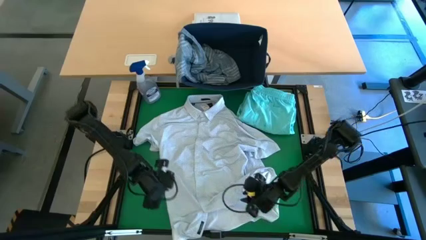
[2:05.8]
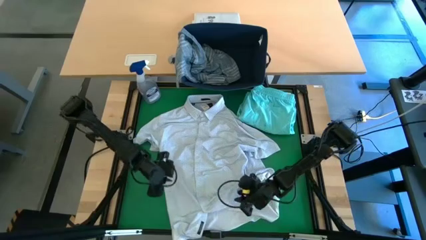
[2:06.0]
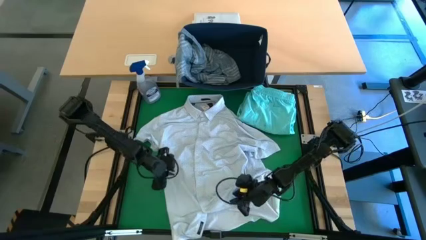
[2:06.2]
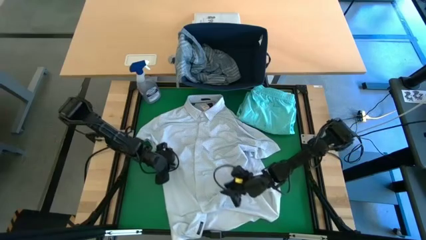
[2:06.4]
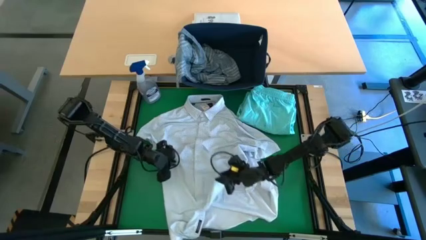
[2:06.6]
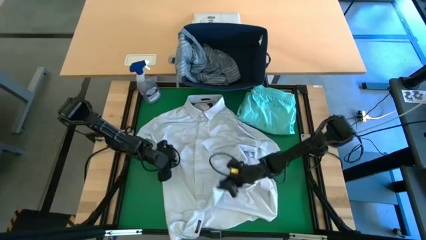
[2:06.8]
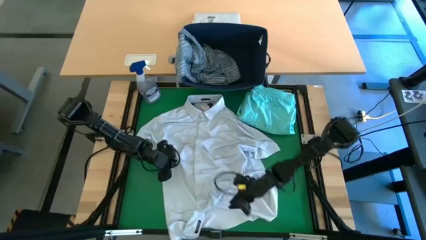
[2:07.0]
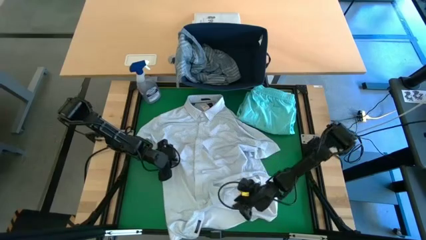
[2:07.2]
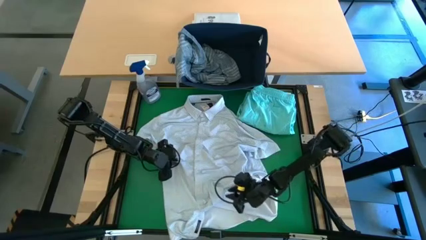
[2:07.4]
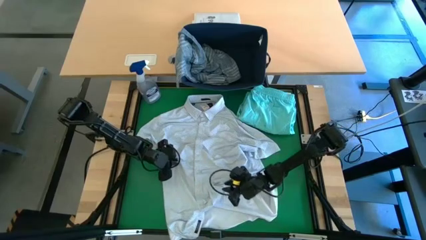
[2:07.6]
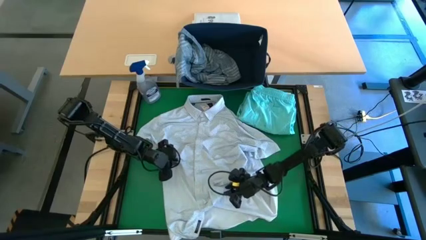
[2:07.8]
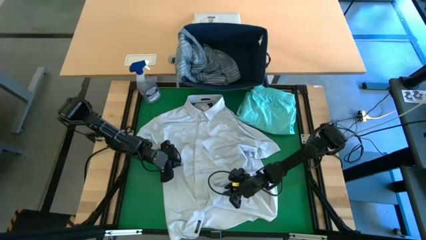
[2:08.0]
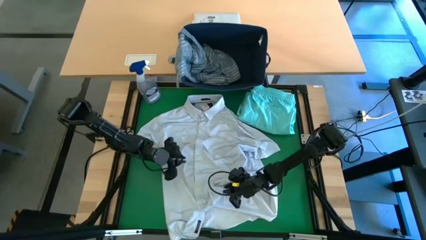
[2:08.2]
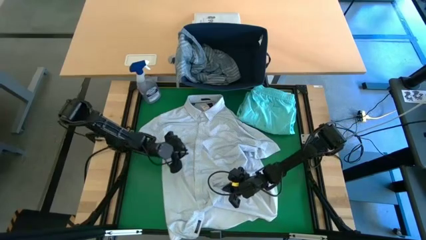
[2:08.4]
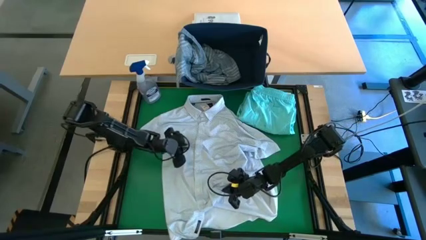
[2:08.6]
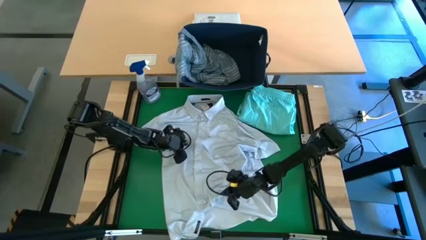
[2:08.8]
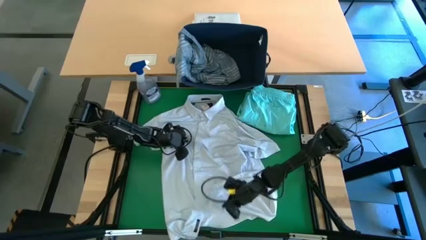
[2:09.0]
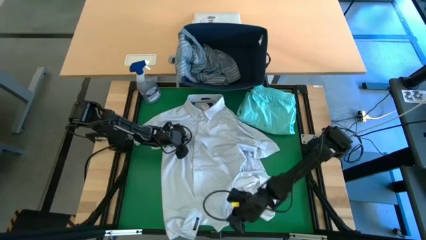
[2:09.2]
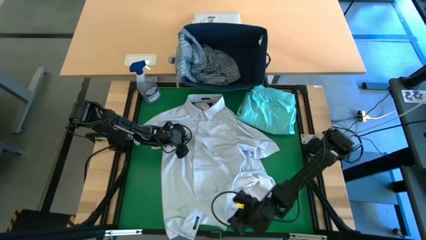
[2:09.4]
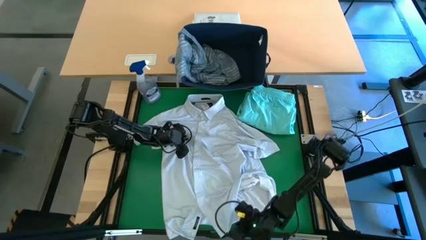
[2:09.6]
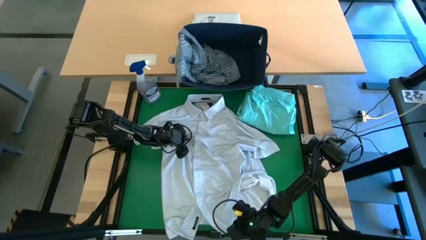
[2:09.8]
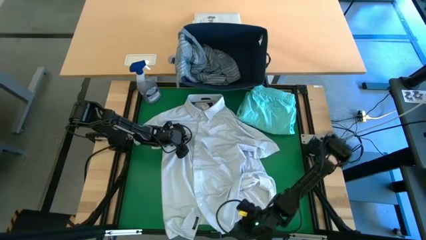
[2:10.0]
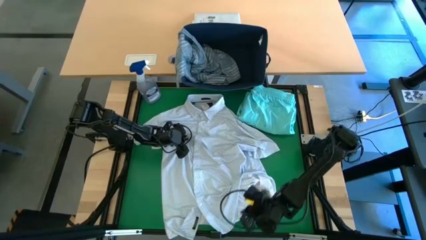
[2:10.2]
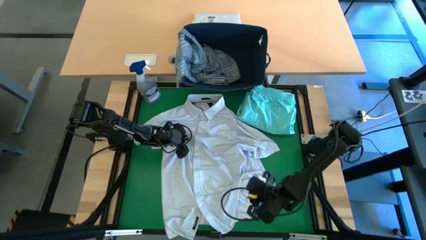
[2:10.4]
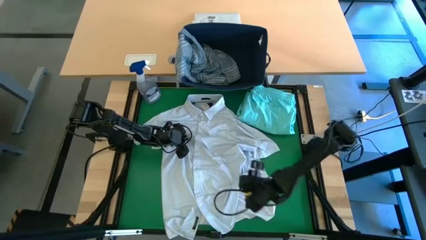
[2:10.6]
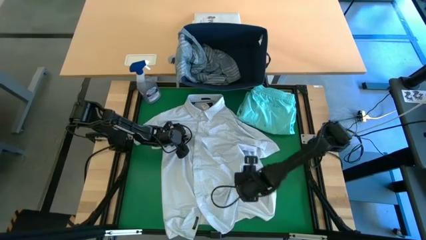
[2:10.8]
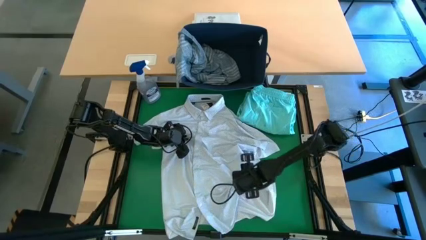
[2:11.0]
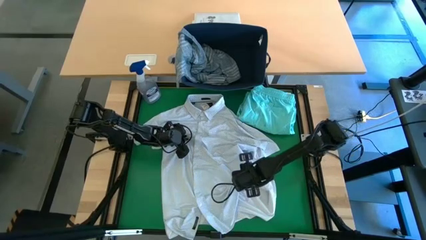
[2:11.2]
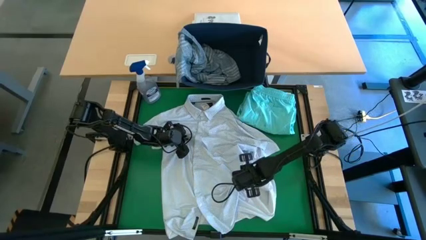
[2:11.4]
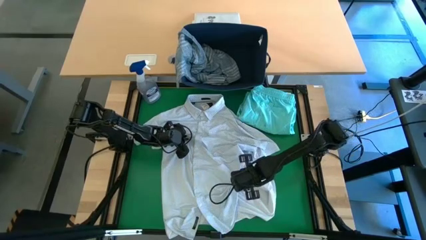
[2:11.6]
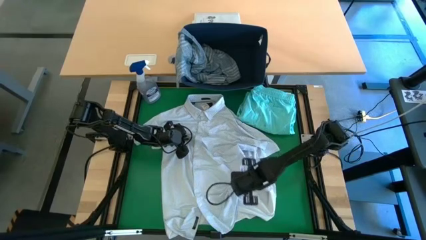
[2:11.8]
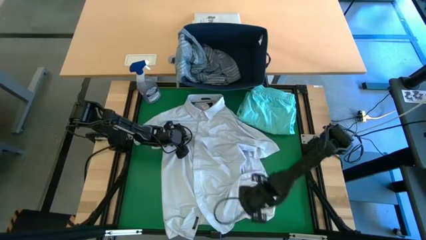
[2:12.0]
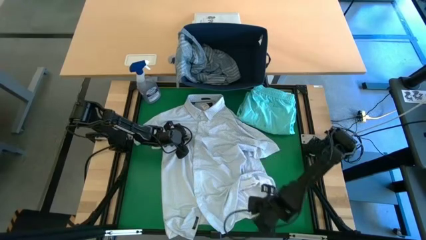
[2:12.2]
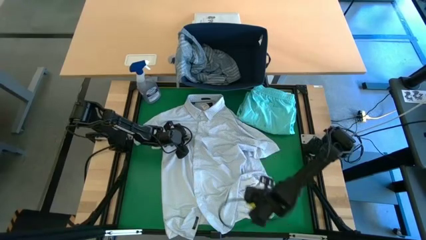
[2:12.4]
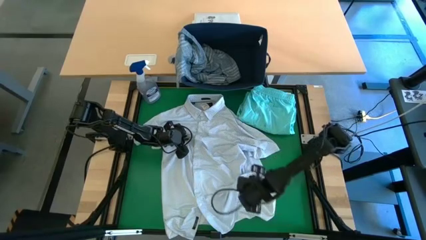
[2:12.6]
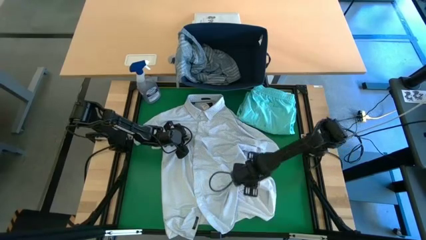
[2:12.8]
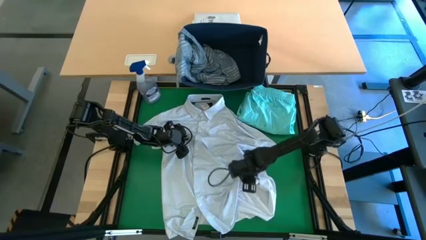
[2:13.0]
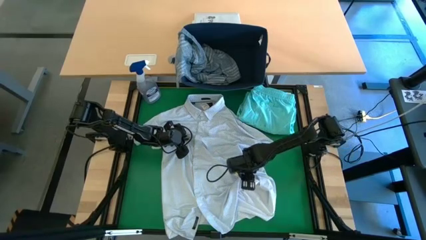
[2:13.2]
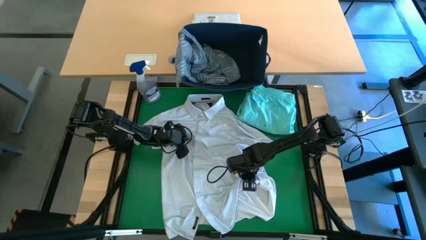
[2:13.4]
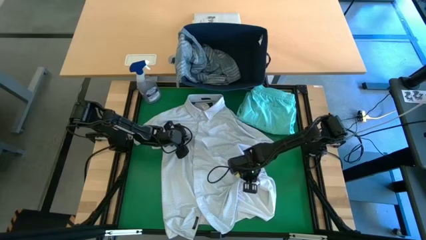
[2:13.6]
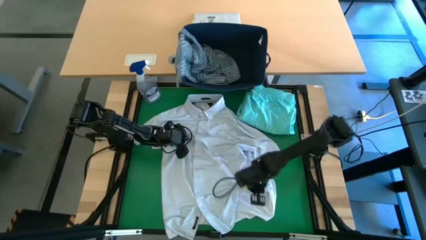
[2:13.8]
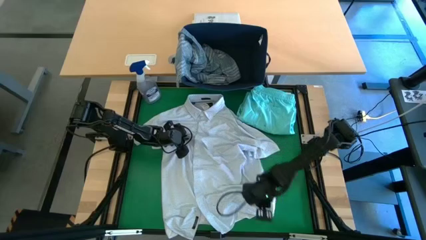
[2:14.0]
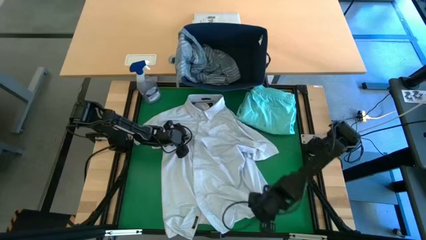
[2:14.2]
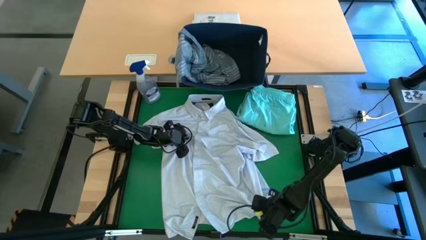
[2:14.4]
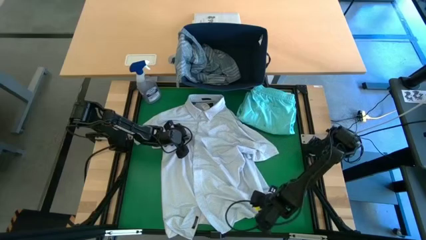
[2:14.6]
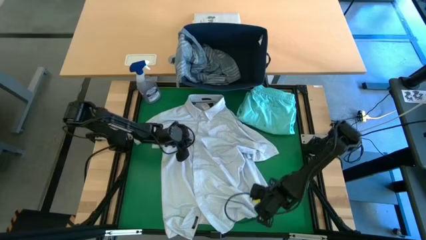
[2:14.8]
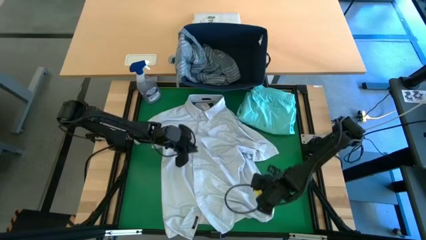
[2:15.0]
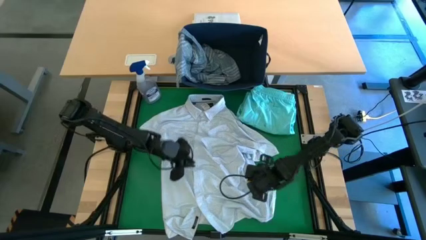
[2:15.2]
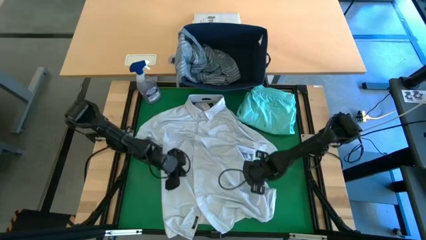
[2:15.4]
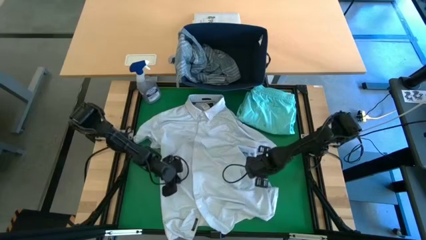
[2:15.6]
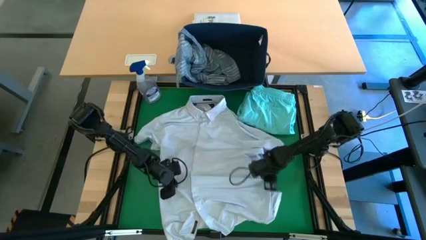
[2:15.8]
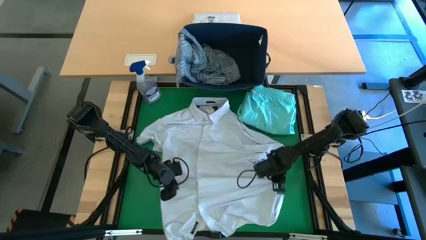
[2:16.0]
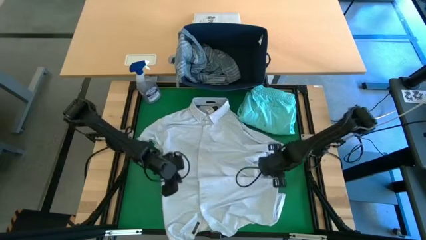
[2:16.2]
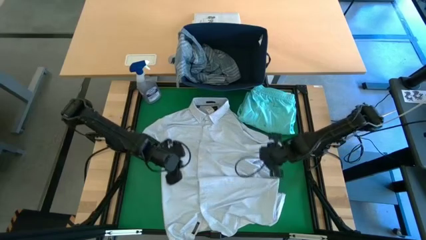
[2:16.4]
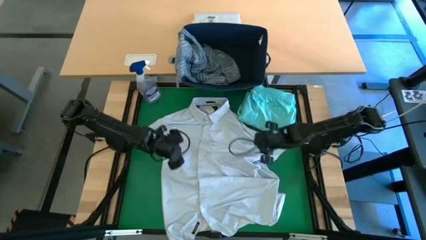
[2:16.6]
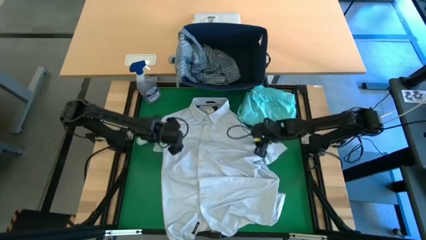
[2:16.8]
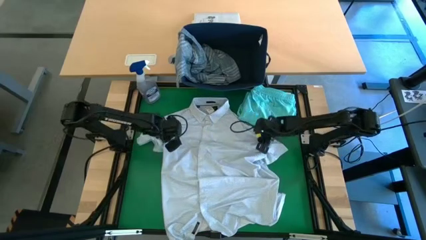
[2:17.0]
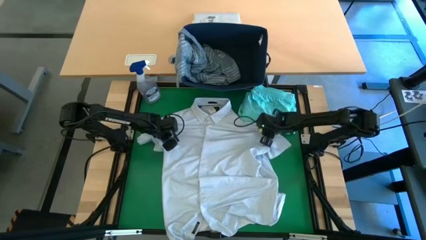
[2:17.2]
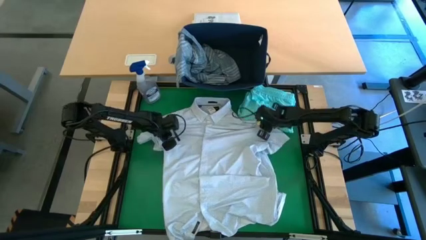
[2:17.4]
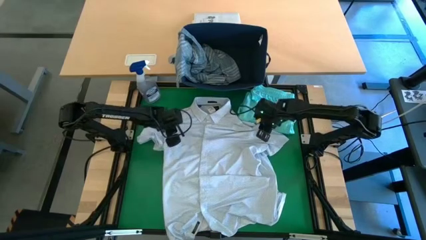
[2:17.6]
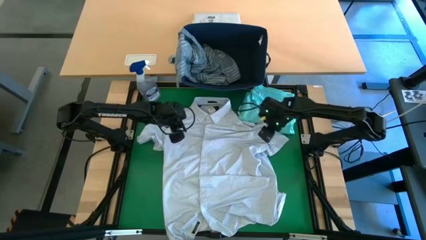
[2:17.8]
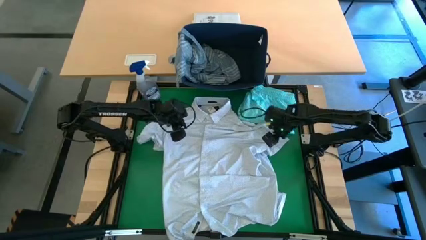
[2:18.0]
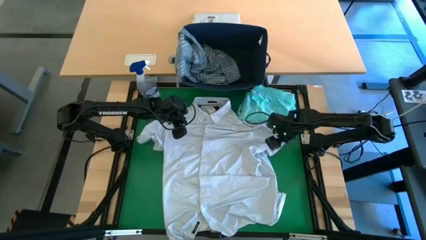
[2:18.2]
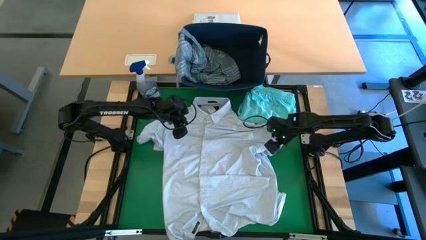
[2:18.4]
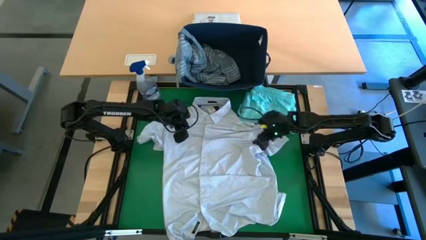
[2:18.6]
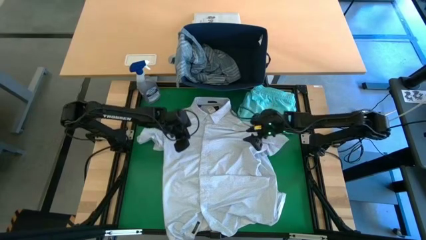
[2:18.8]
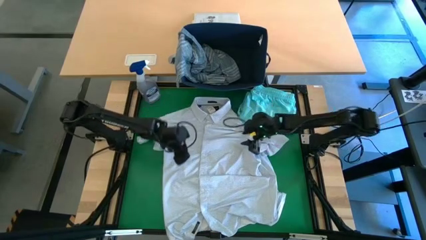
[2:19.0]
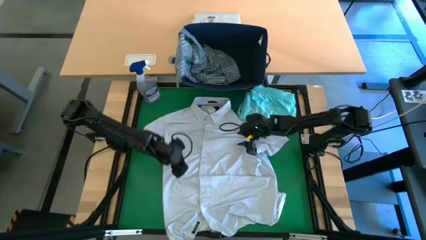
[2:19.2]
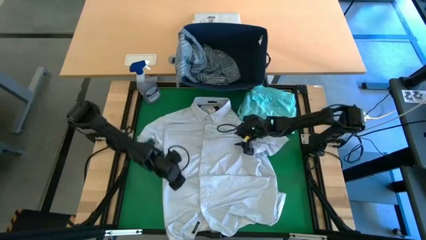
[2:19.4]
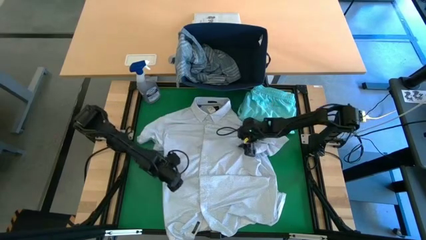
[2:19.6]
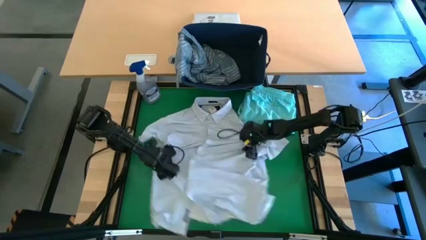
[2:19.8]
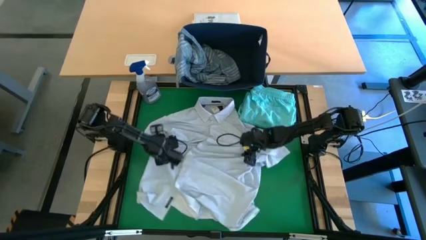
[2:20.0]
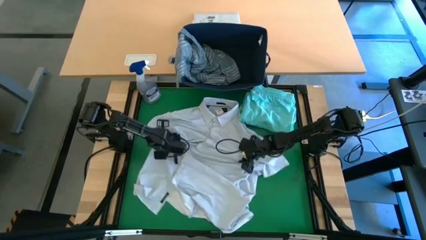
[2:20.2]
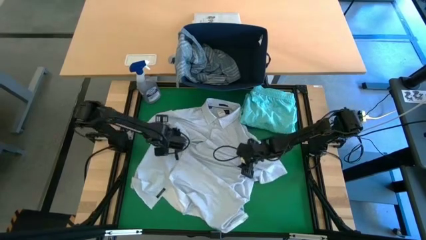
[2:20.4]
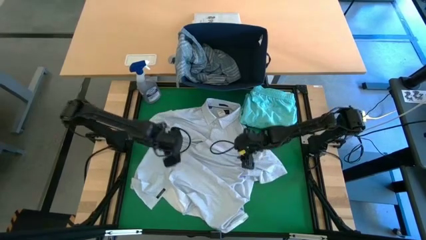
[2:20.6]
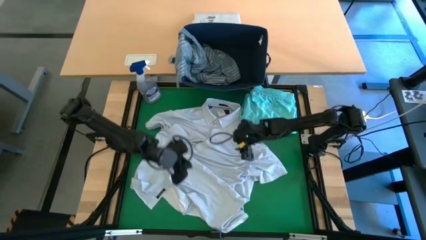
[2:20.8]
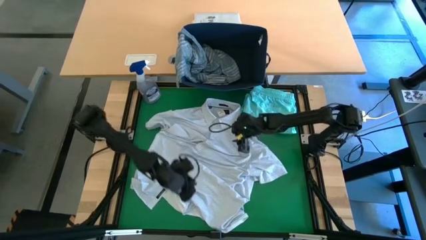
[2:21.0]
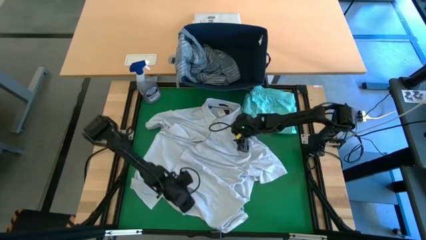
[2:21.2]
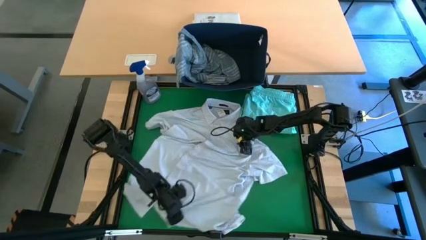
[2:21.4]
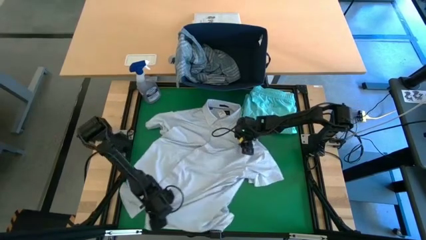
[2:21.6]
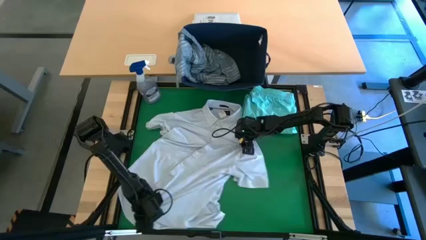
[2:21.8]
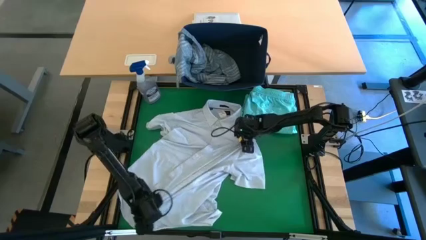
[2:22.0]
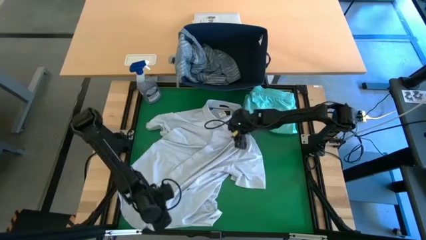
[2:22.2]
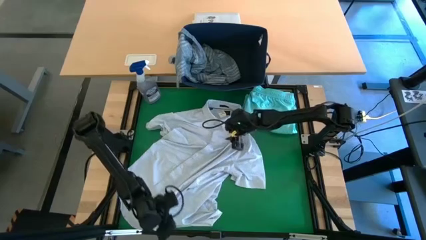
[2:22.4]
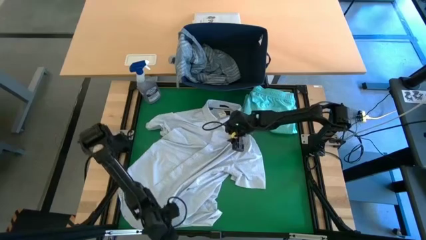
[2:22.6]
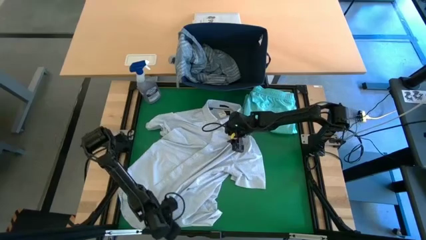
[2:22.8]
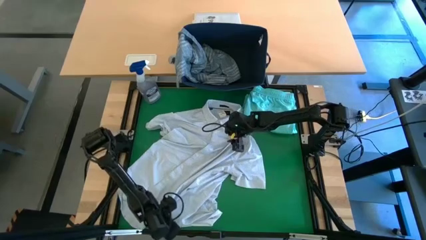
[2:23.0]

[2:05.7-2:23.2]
Task: Fold laundry
Fold the white polo shirt
